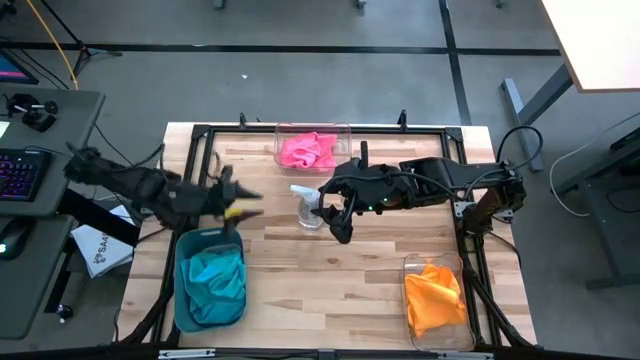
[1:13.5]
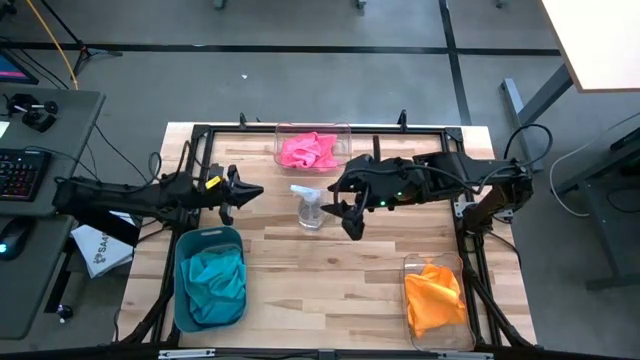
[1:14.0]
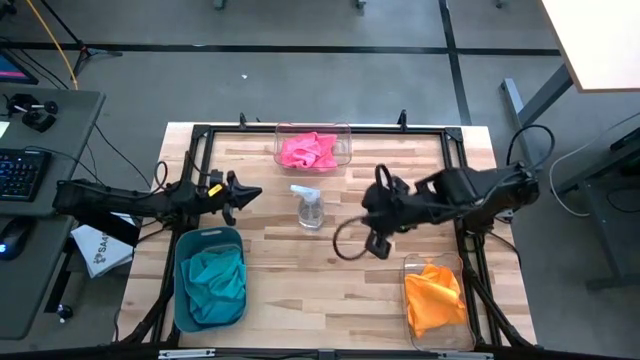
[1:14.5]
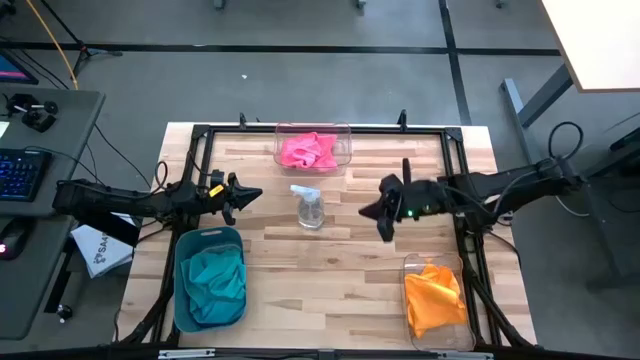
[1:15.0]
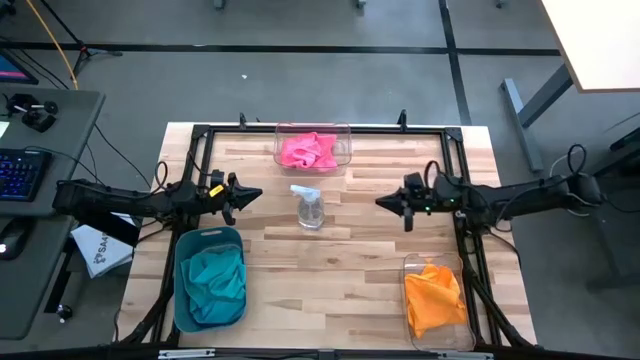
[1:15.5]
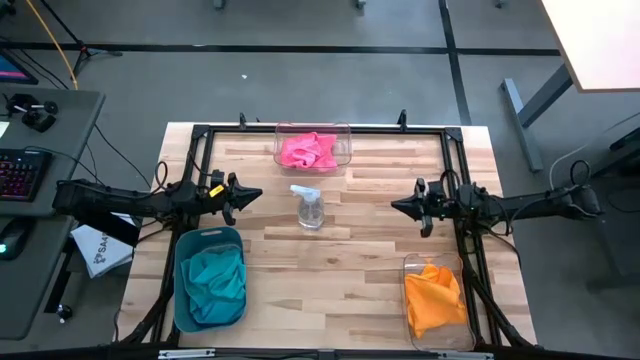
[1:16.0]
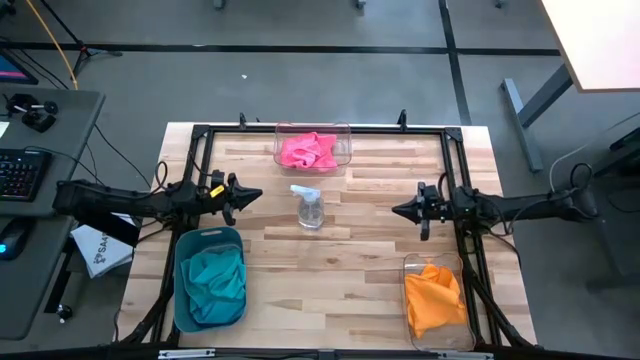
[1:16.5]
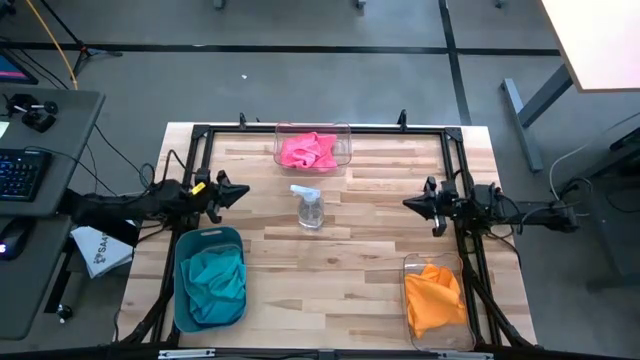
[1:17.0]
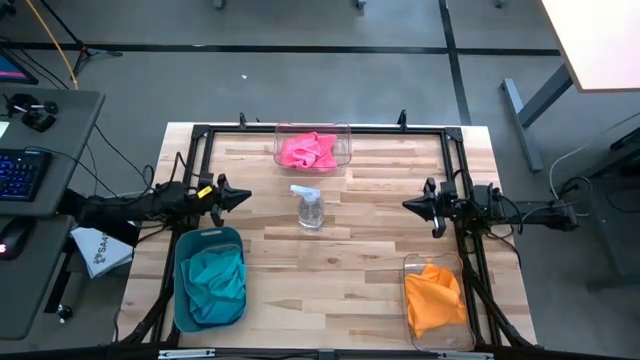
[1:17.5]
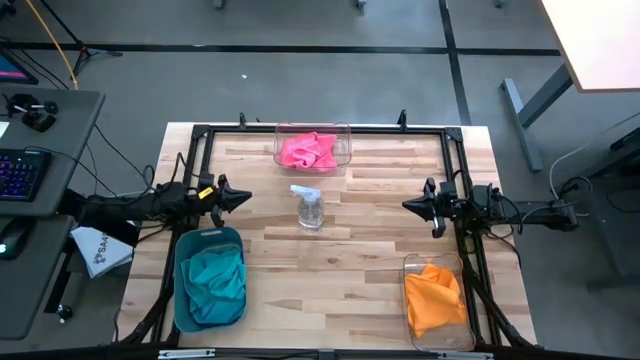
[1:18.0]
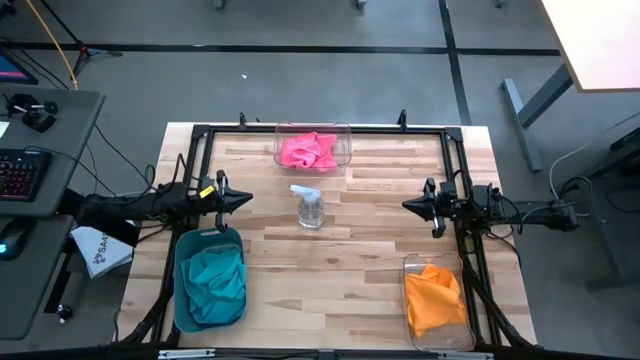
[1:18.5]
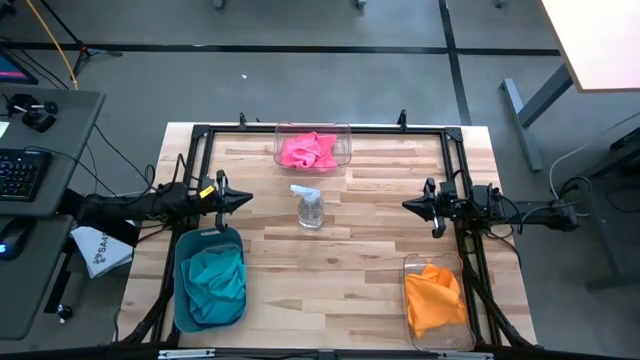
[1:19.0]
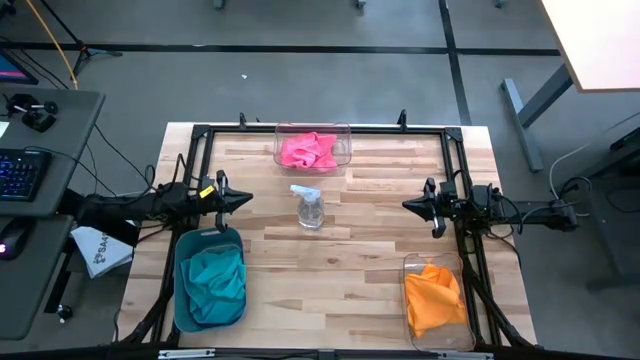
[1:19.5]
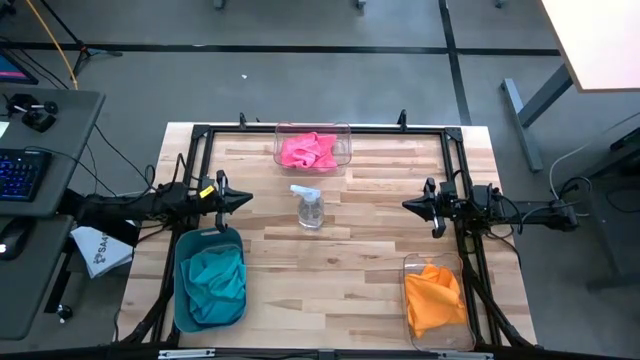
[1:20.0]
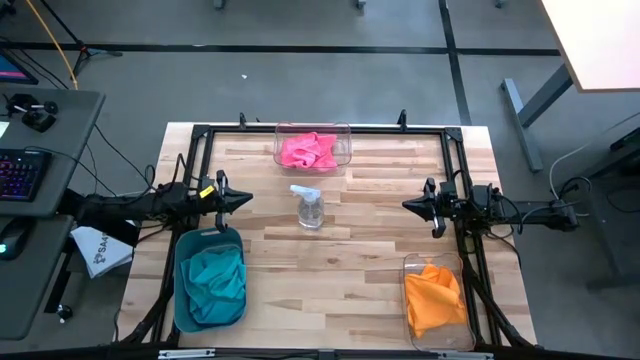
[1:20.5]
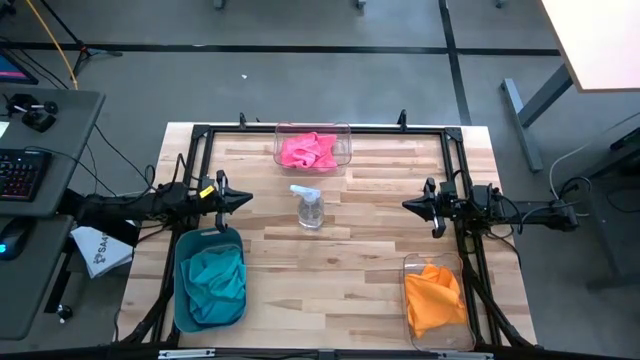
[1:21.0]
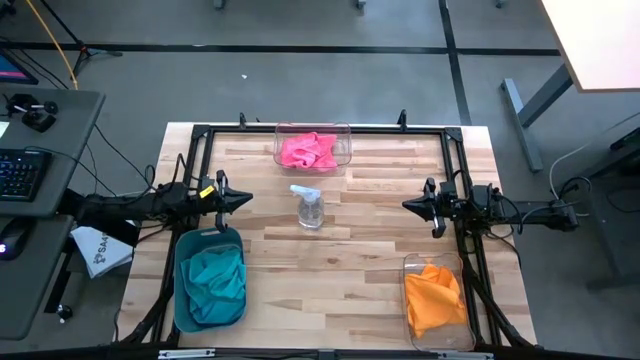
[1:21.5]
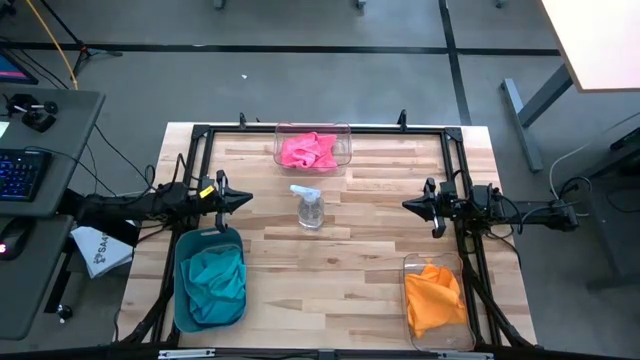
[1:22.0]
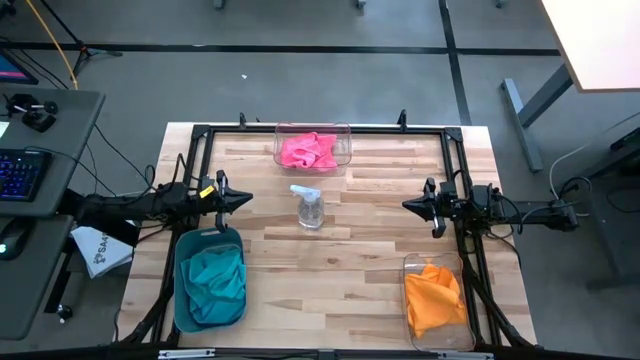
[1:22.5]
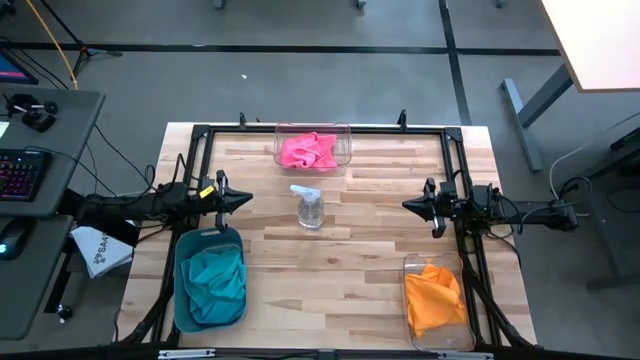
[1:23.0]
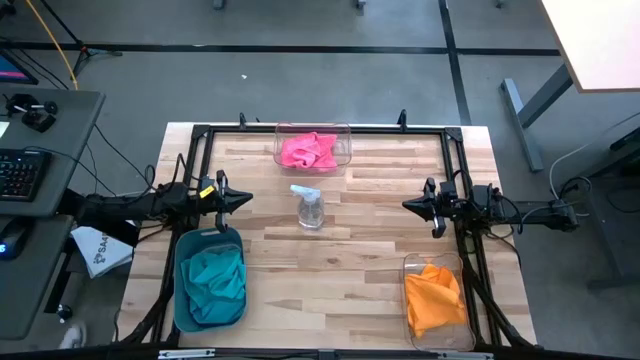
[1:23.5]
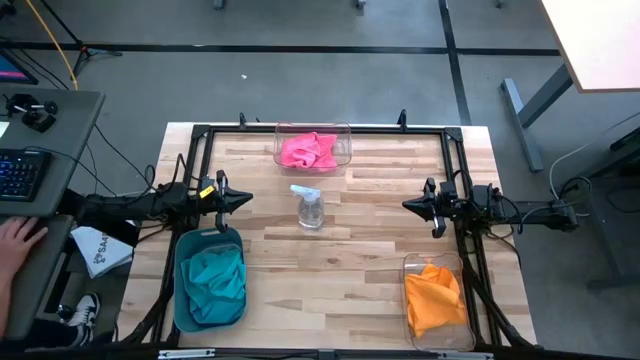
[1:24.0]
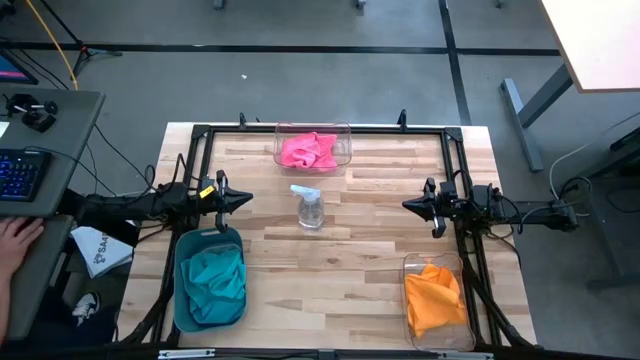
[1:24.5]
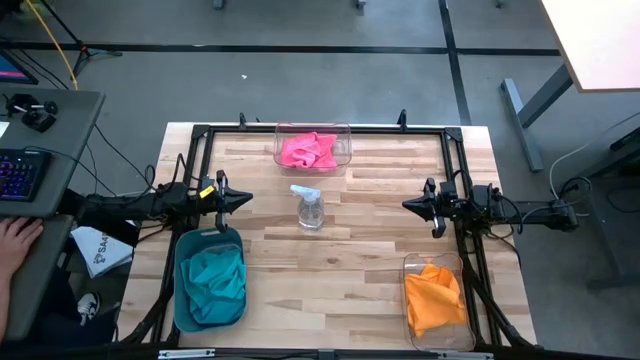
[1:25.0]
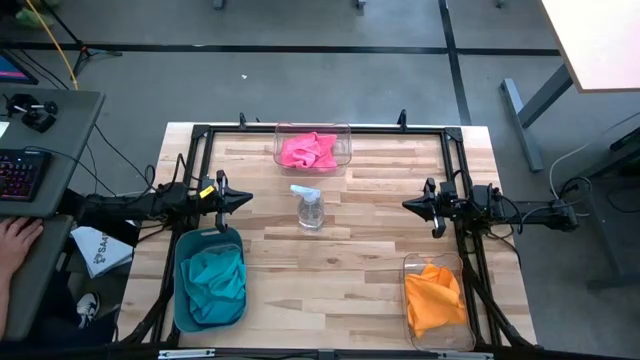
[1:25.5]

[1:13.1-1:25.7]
Task: Sort microfiber towel by color & place in baskets
Return to Home Position

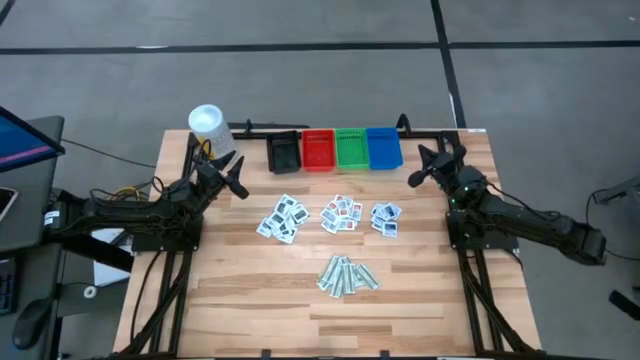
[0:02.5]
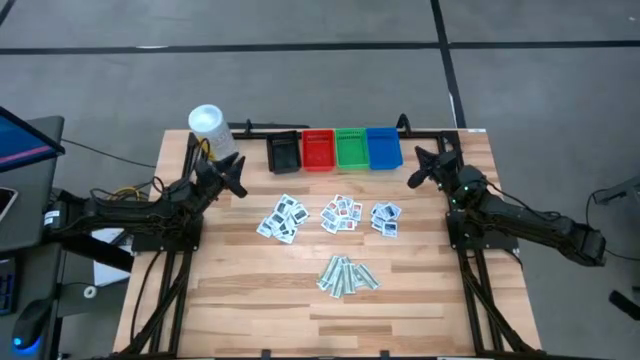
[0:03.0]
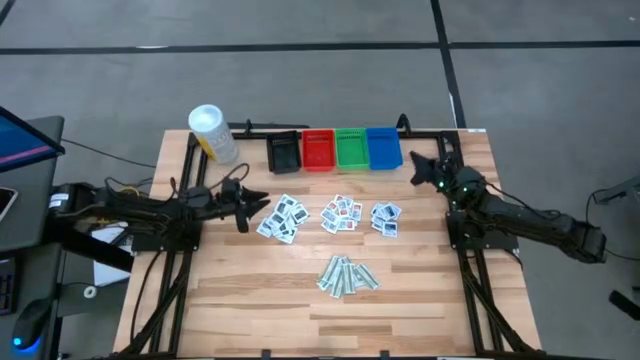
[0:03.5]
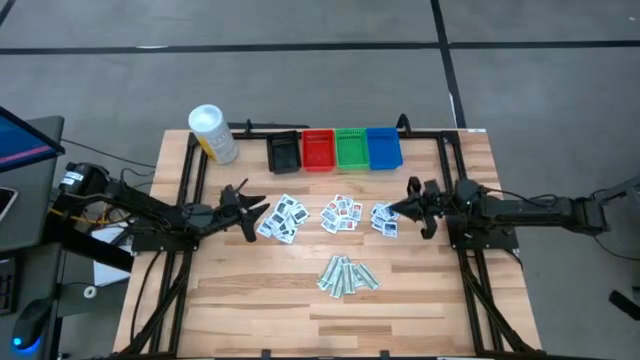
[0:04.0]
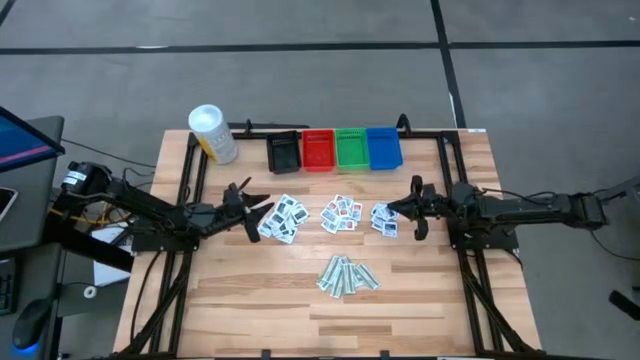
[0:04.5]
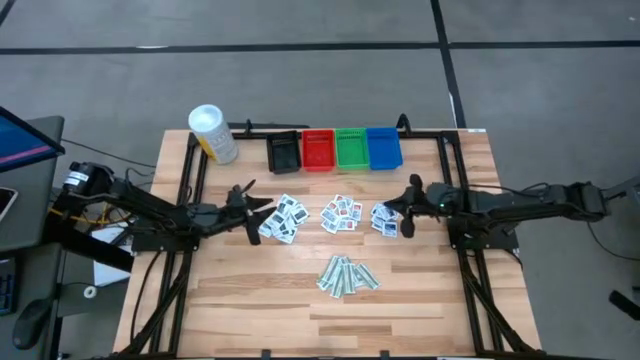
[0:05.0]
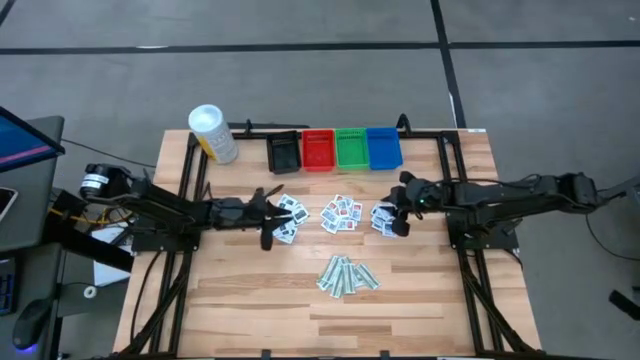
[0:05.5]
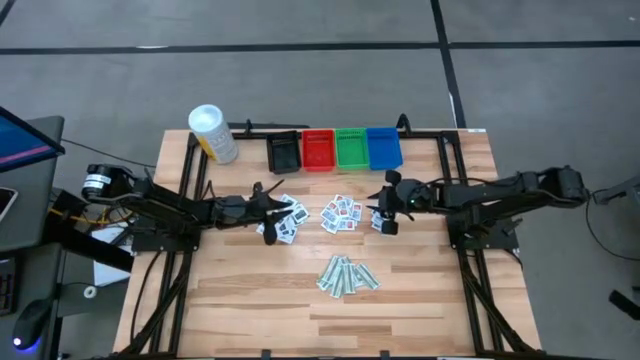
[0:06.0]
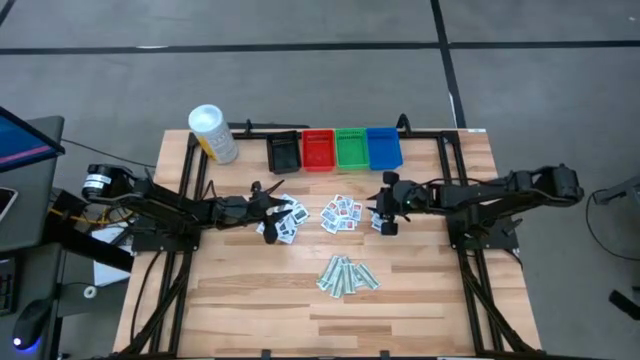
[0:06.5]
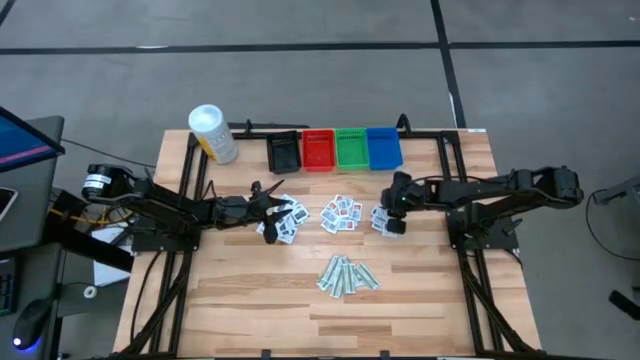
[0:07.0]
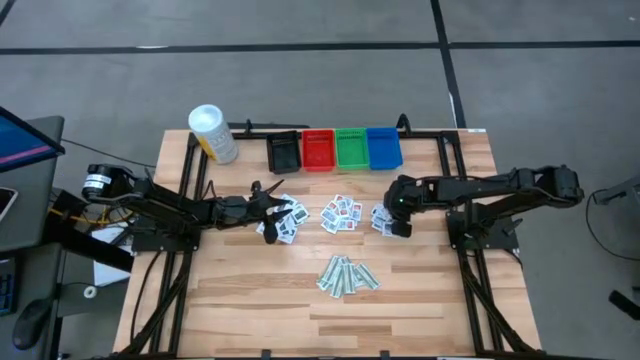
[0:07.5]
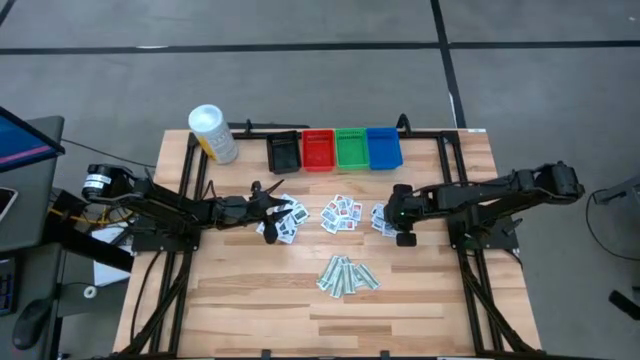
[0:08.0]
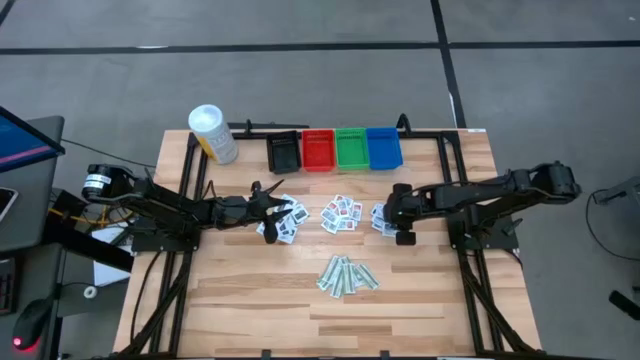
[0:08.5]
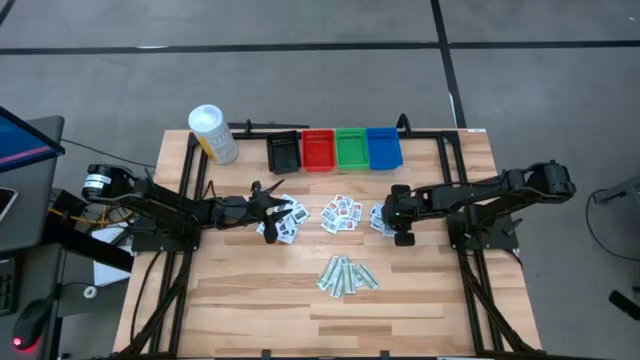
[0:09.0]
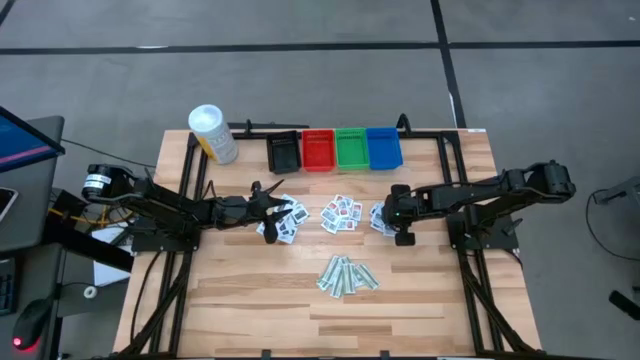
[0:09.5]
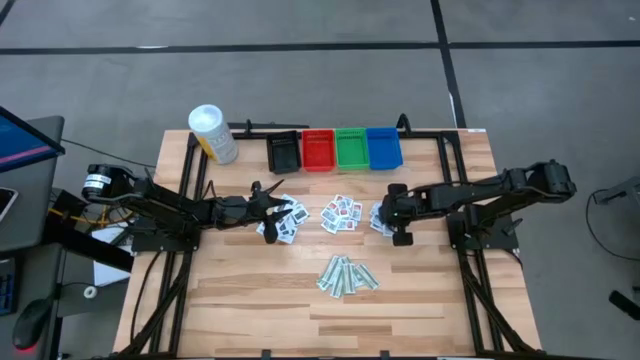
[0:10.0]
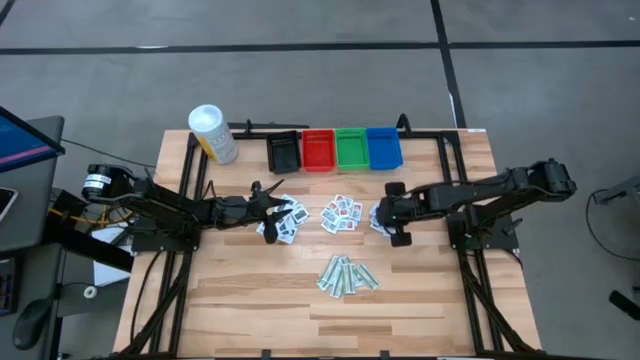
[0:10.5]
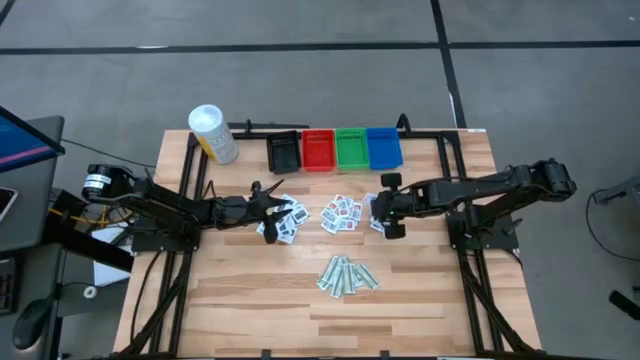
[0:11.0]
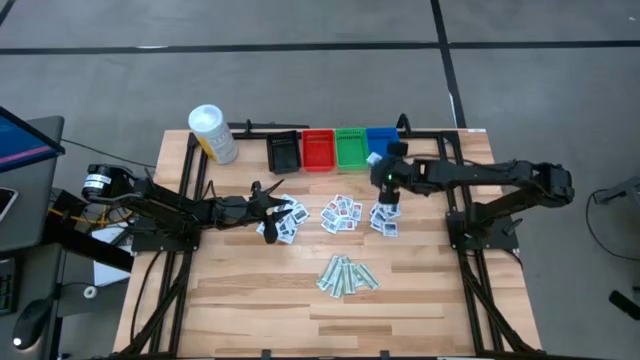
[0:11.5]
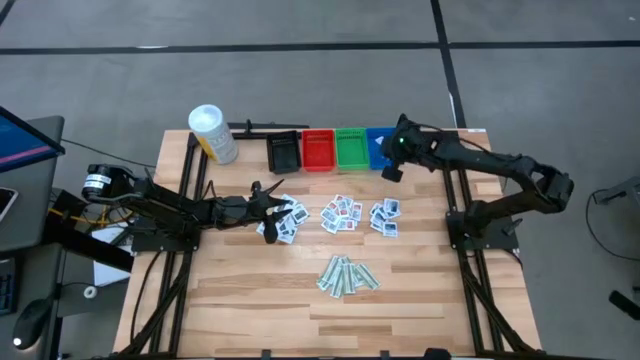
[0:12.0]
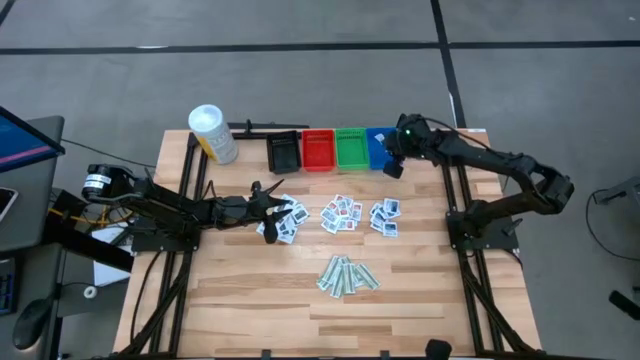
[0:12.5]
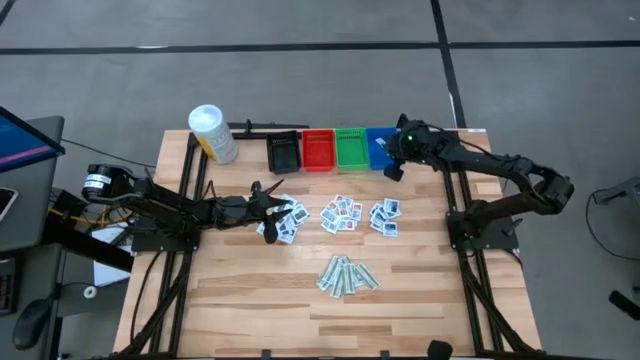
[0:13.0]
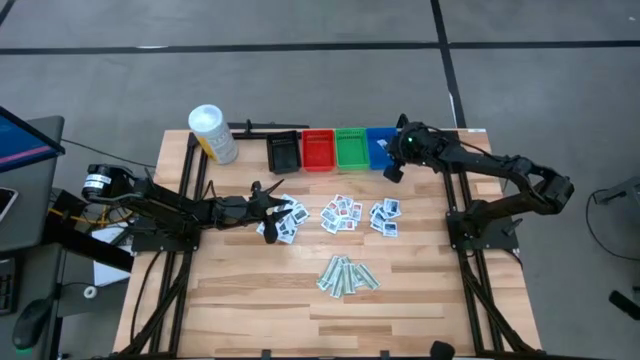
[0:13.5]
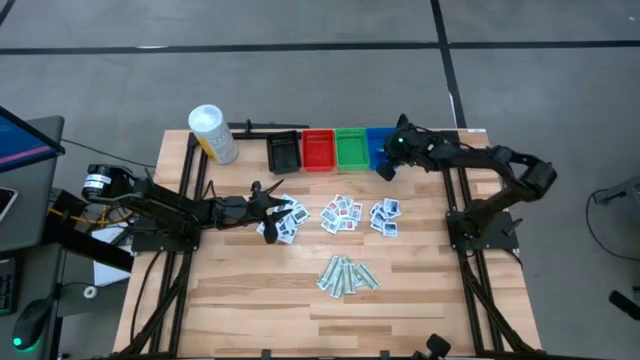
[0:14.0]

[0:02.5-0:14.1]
Task: Pick & Place First Aid Supplies
Put the blue alcohol pad into the blue bin
